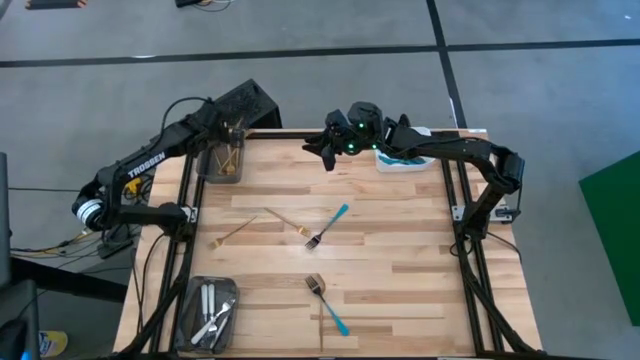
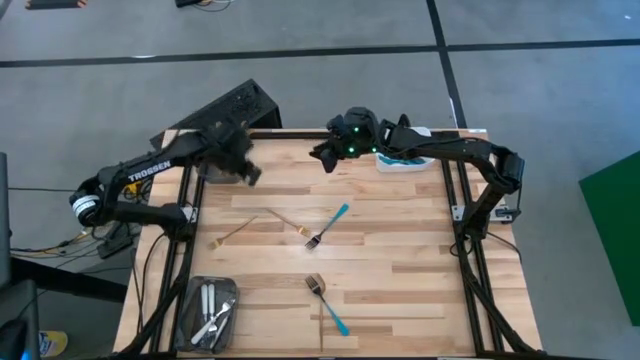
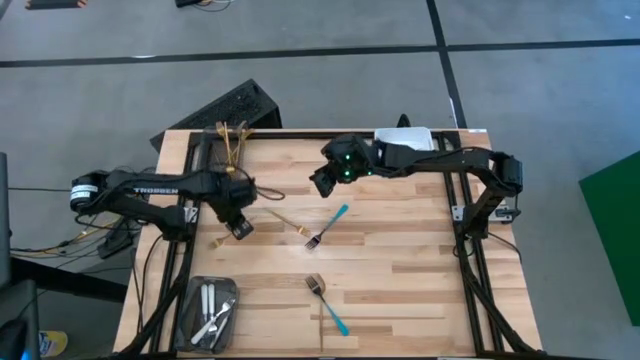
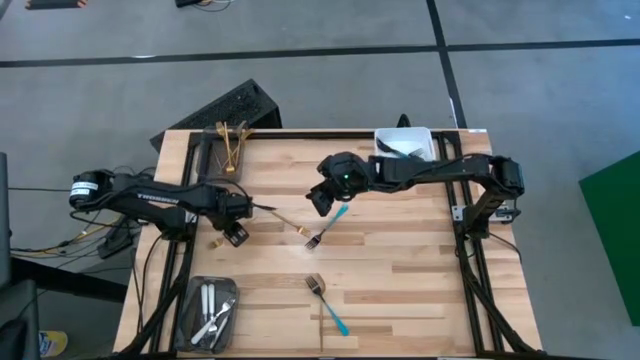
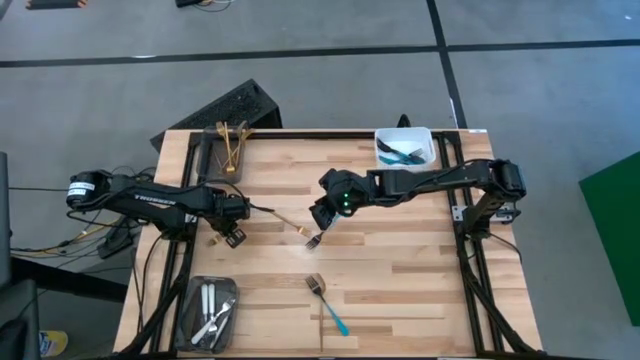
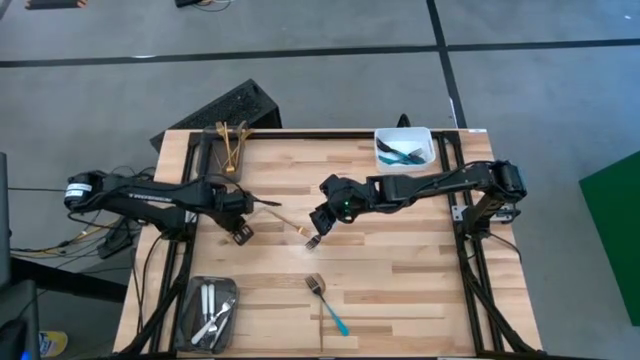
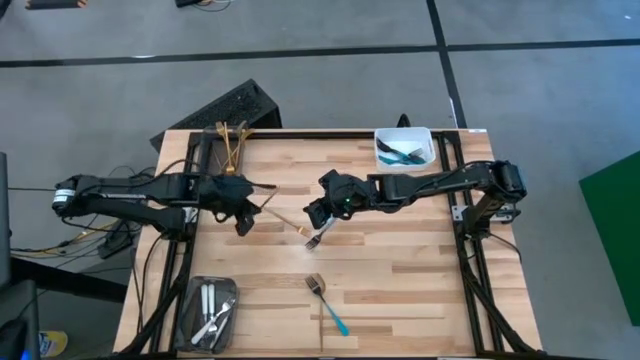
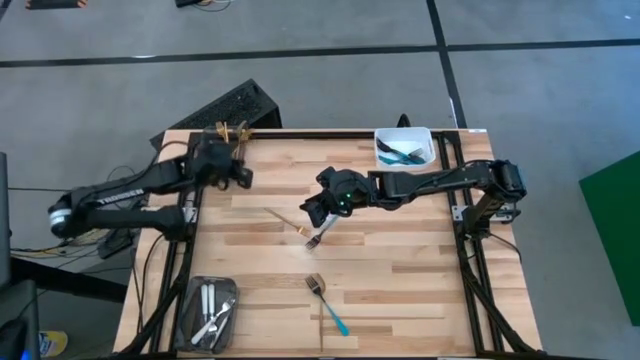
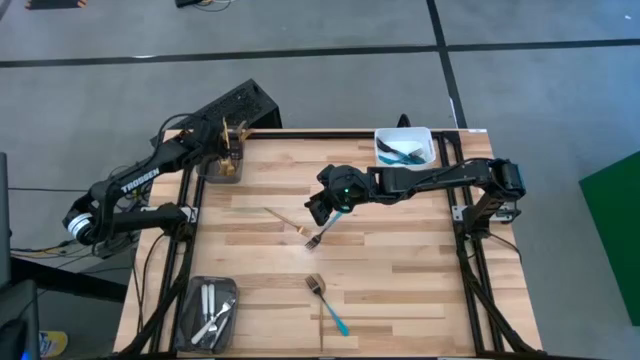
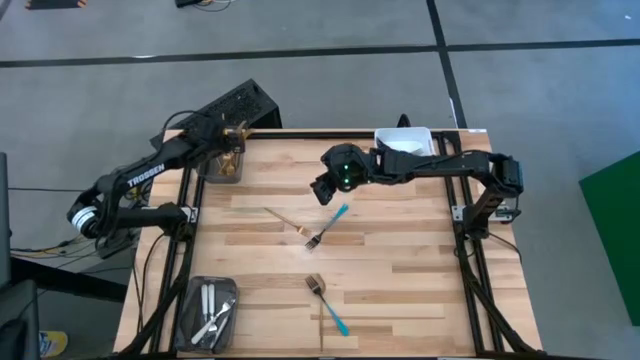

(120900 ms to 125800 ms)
Task: Sort silverware by color (type)
Put the gold fork into the top black bin

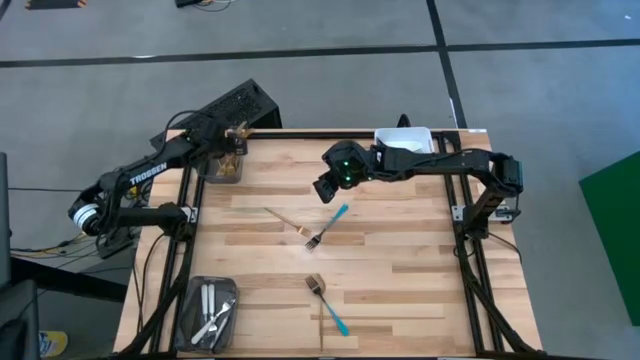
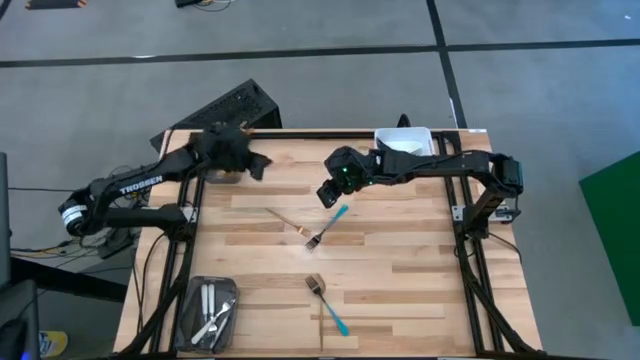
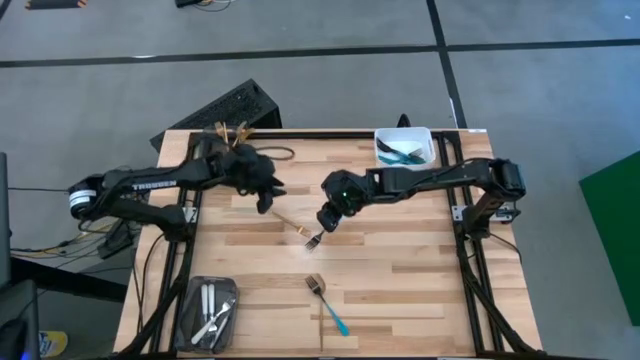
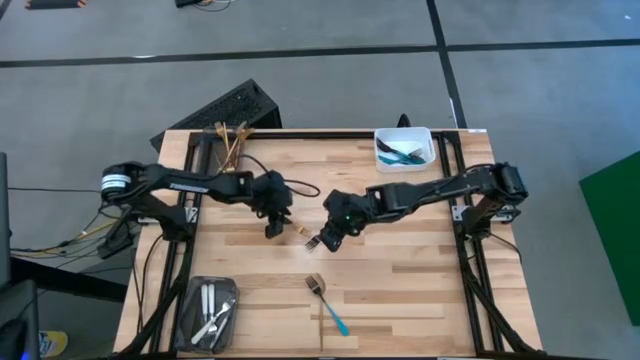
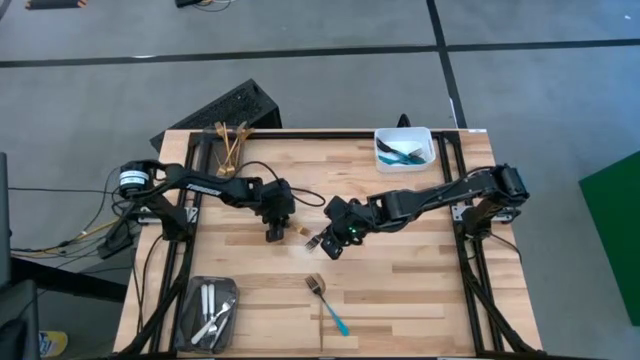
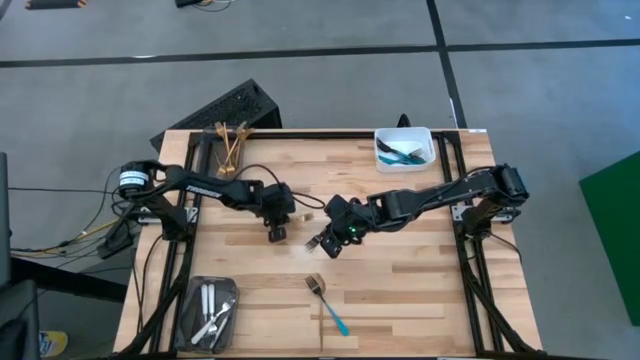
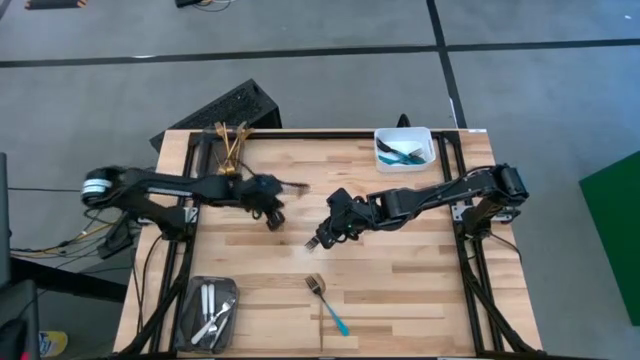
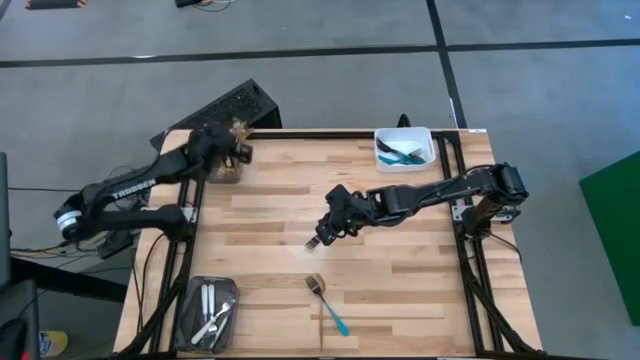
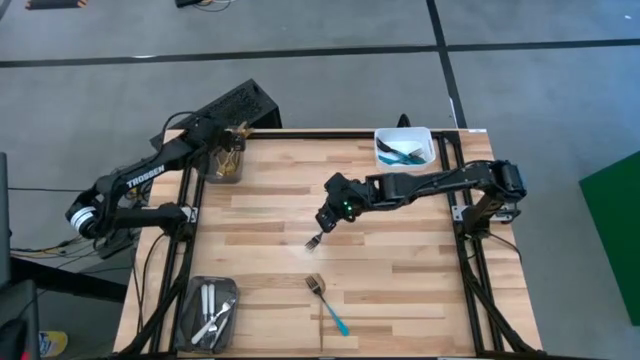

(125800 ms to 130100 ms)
Put the gold fork into the top black bin

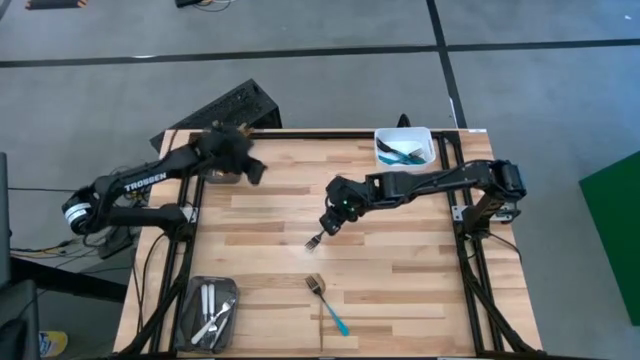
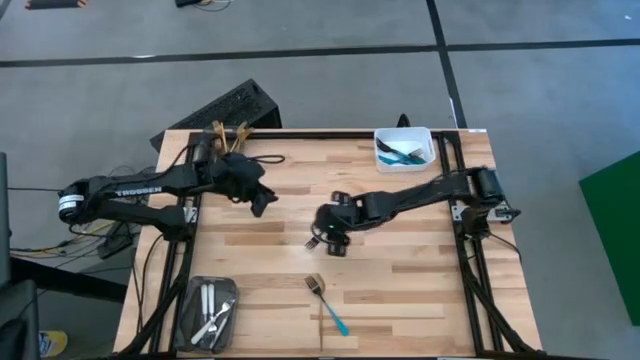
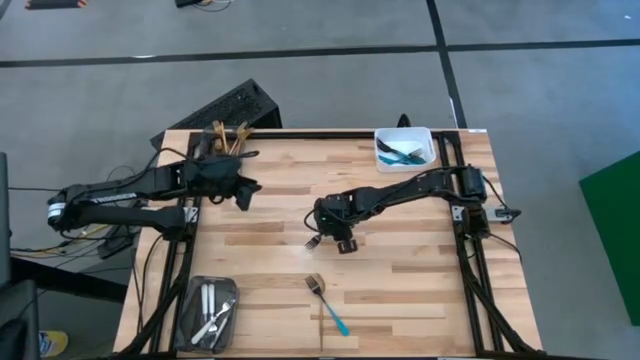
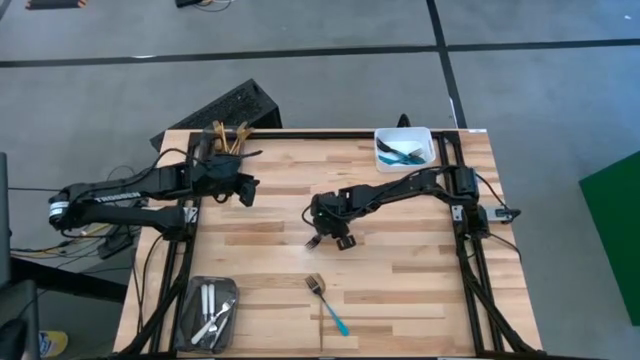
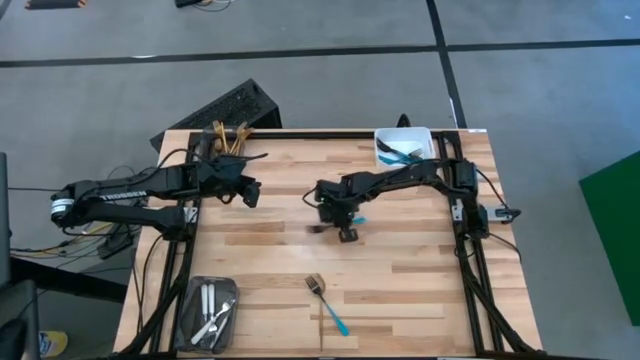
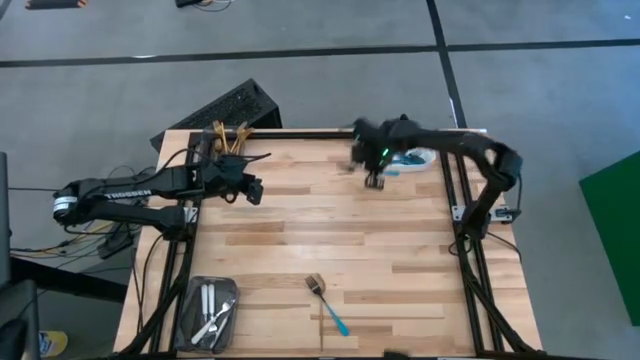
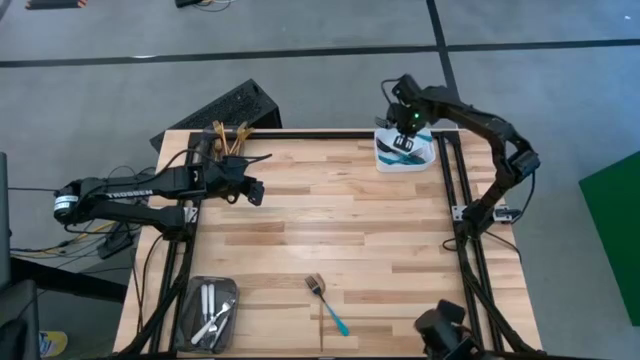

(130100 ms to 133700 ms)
Put the blue fork into the white bin

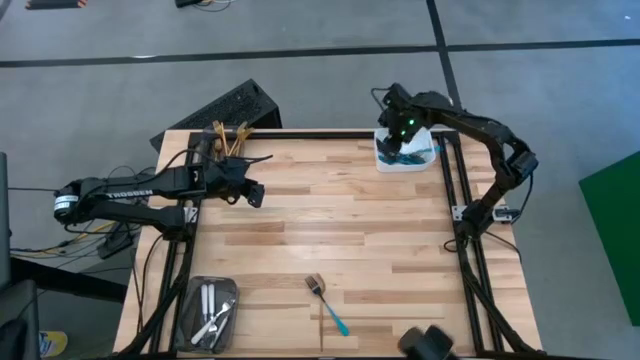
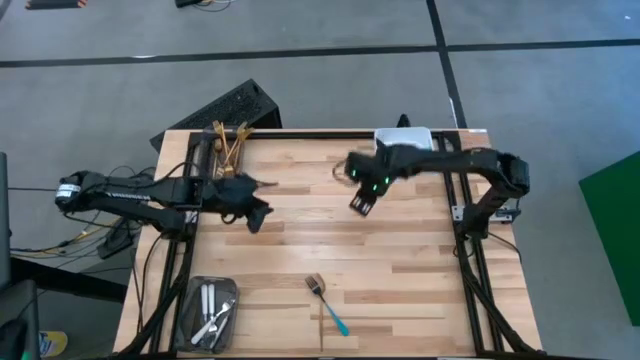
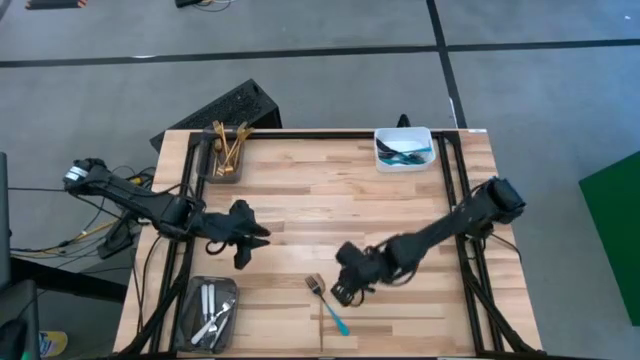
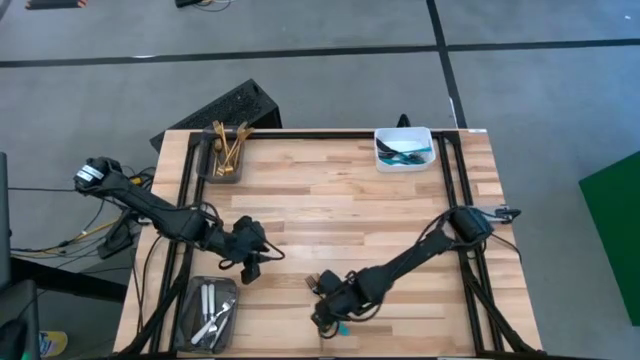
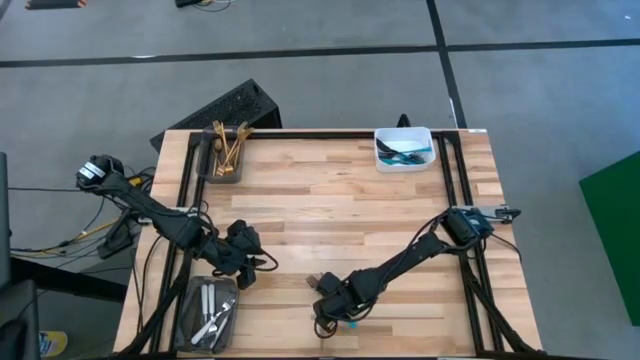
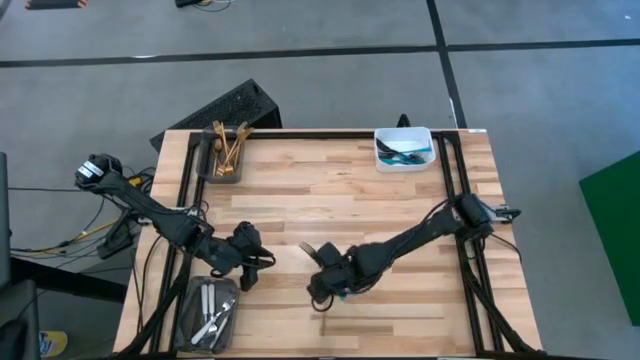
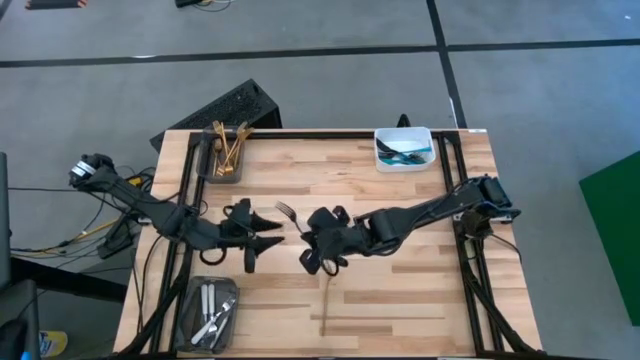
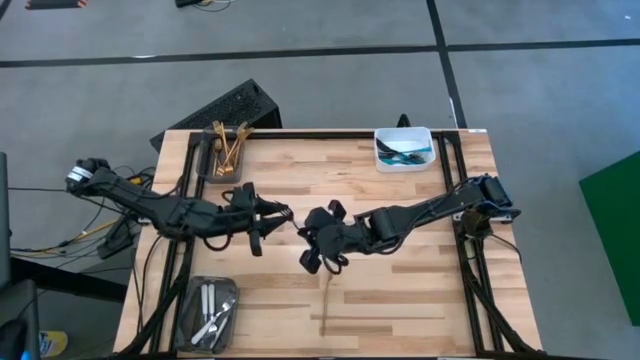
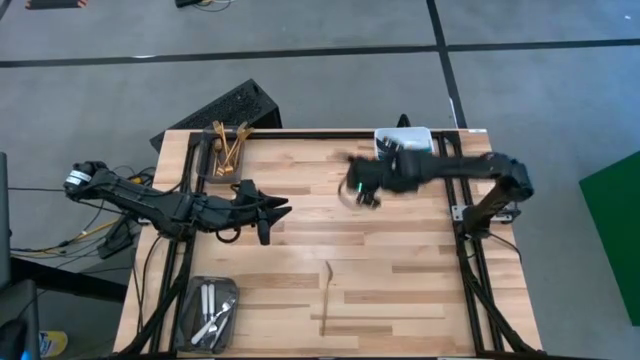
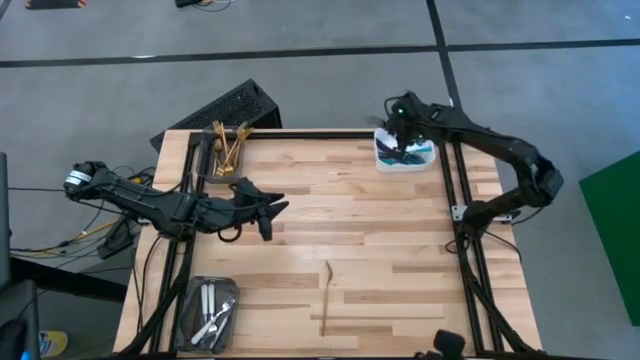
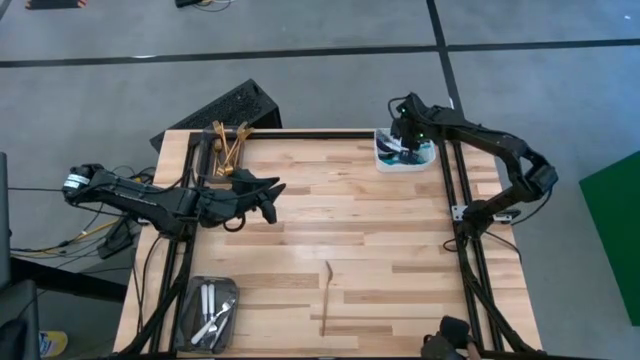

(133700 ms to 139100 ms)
Put the blue fork into the white bin

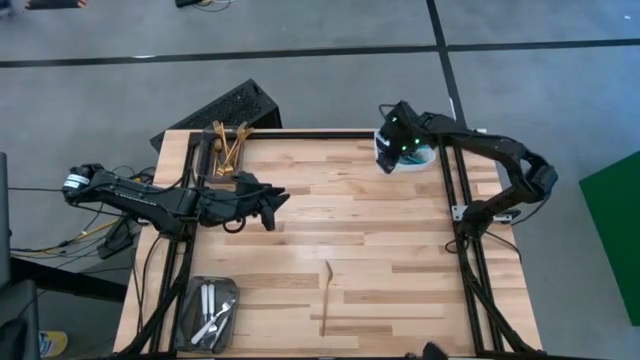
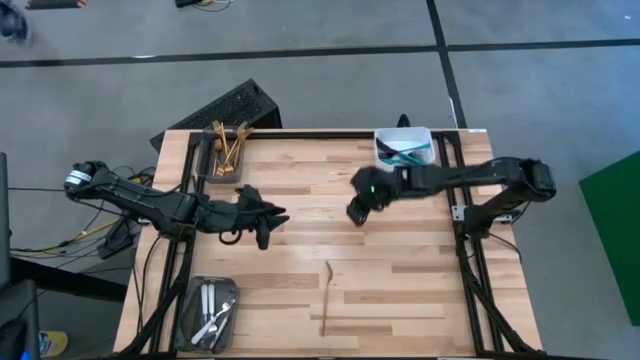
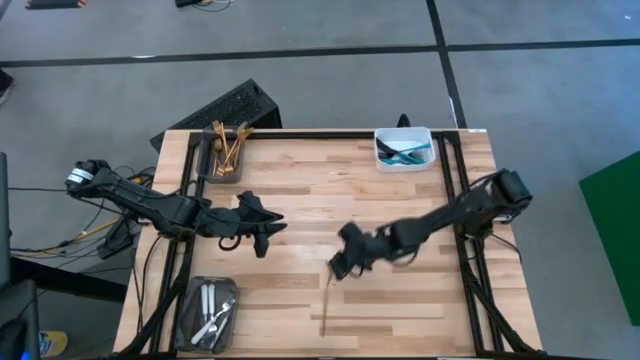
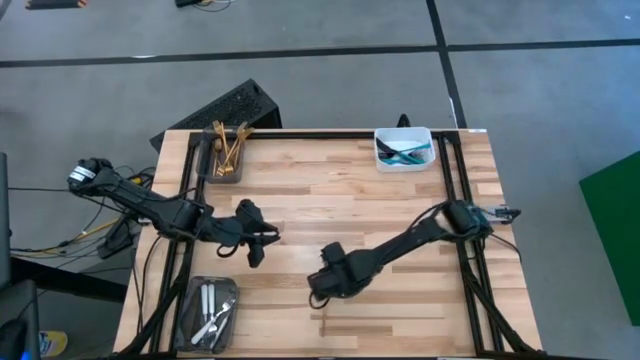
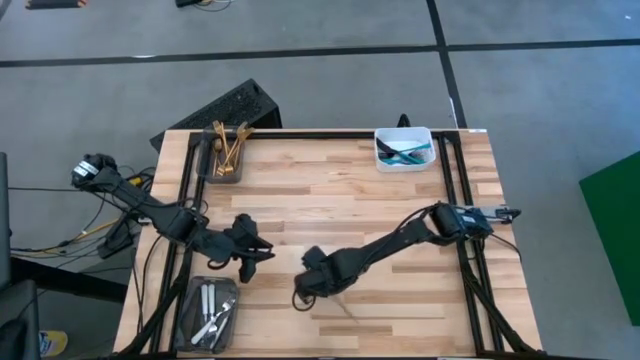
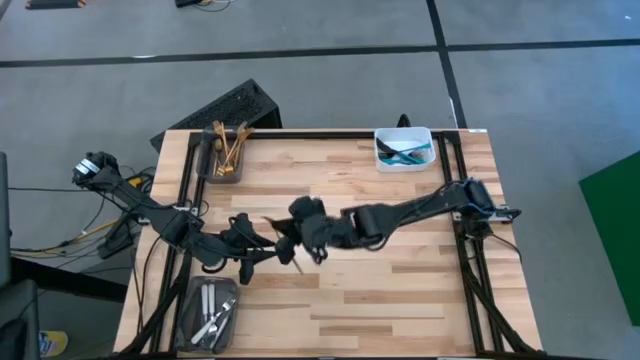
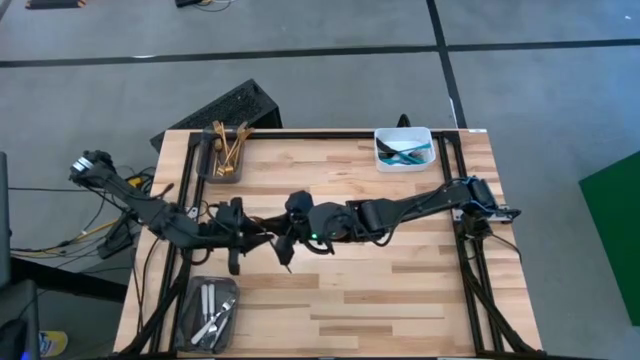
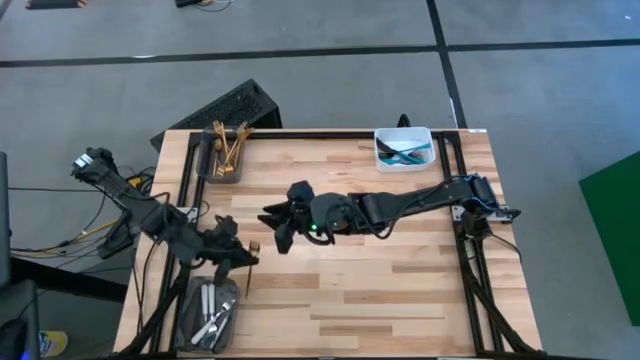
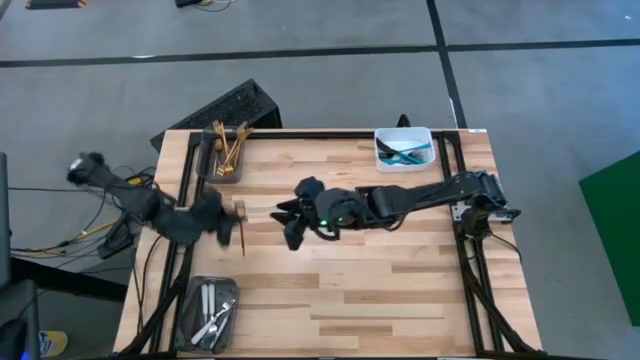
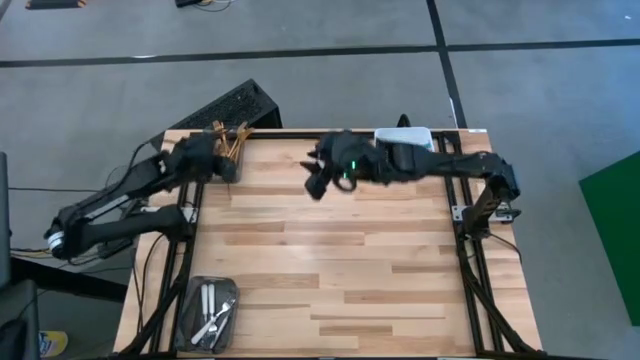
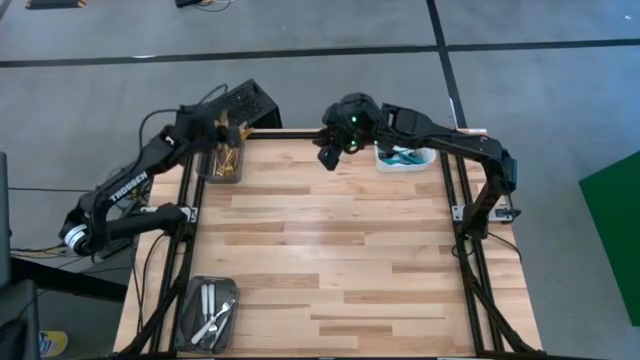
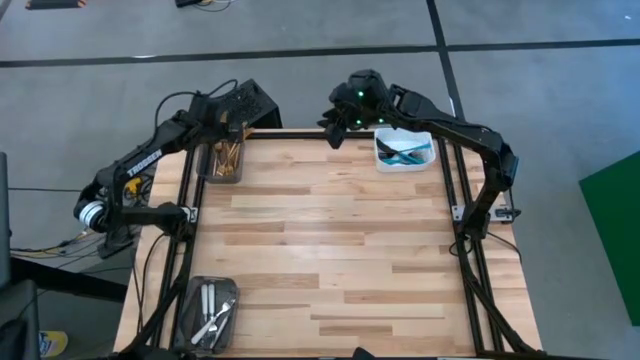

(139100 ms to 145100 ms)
Put the gold fork into the top black bin
